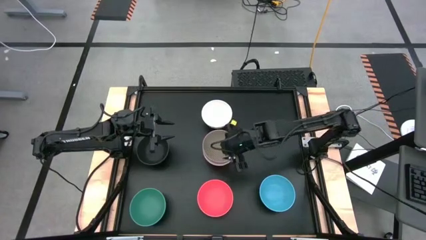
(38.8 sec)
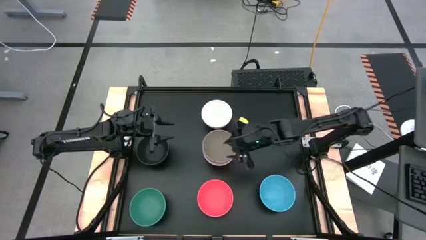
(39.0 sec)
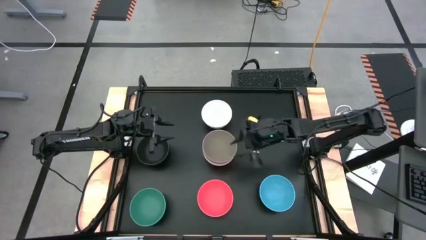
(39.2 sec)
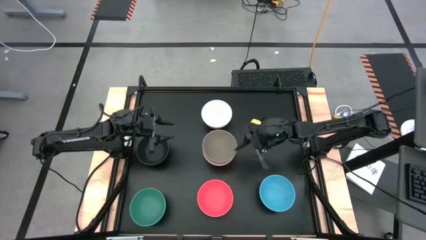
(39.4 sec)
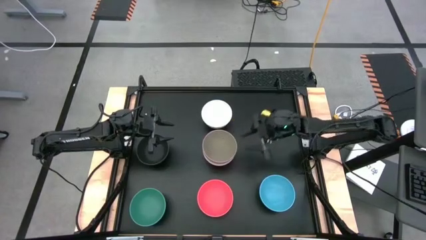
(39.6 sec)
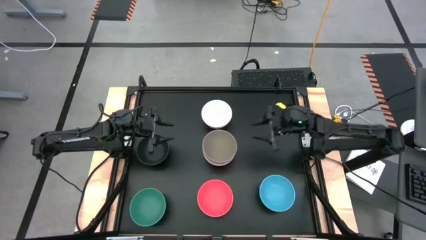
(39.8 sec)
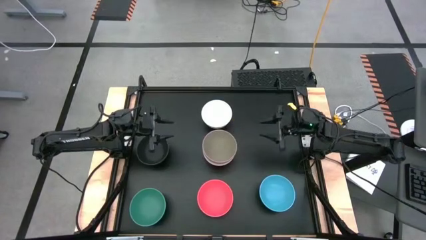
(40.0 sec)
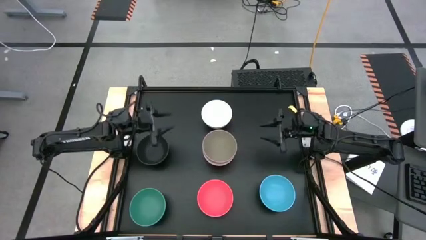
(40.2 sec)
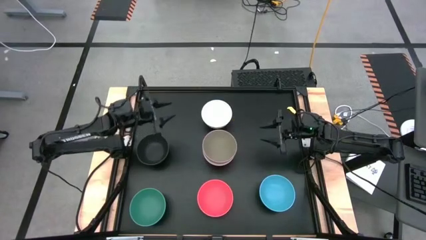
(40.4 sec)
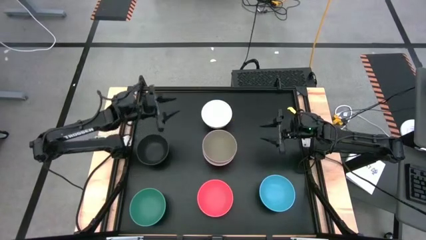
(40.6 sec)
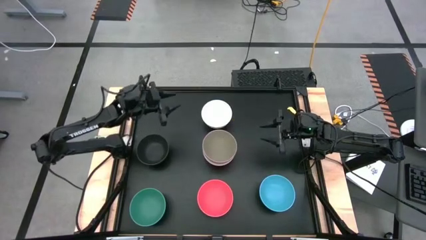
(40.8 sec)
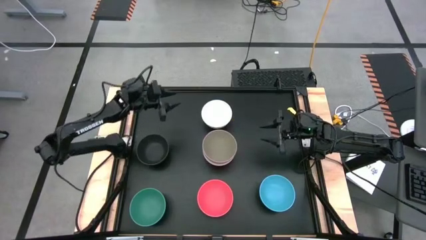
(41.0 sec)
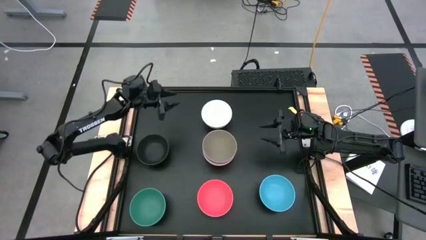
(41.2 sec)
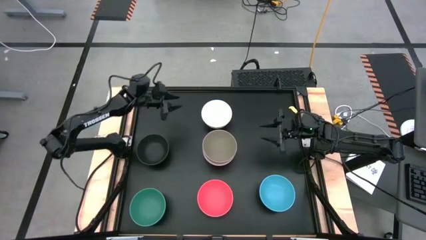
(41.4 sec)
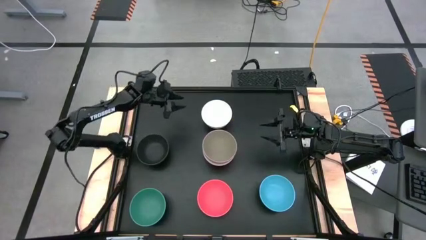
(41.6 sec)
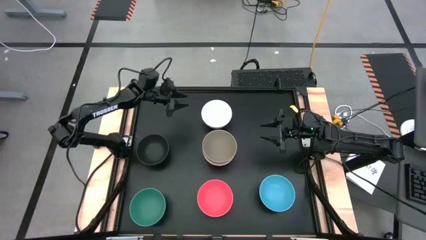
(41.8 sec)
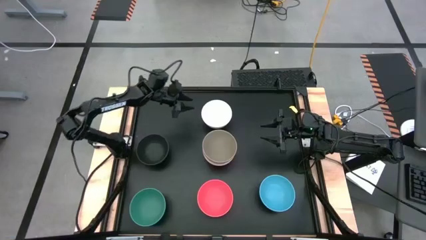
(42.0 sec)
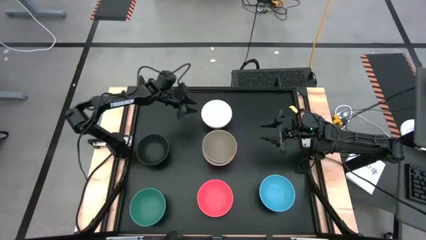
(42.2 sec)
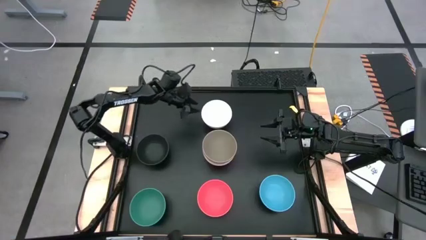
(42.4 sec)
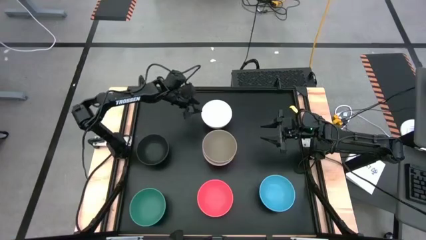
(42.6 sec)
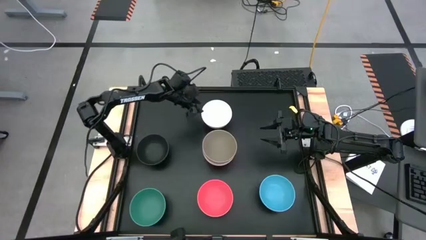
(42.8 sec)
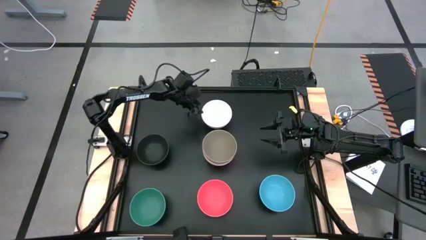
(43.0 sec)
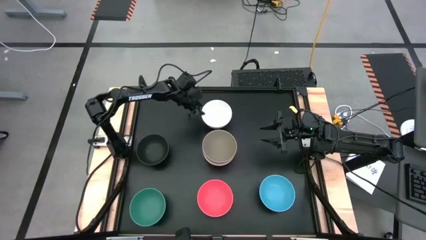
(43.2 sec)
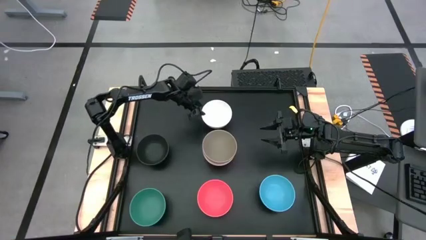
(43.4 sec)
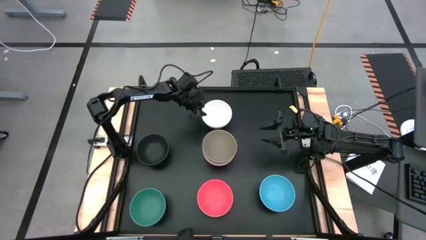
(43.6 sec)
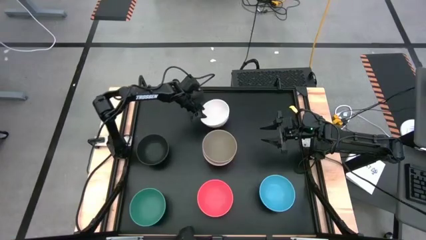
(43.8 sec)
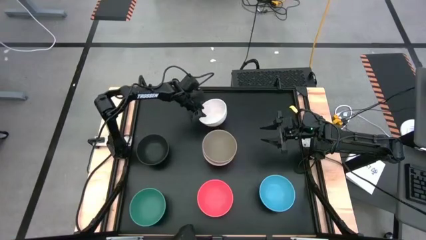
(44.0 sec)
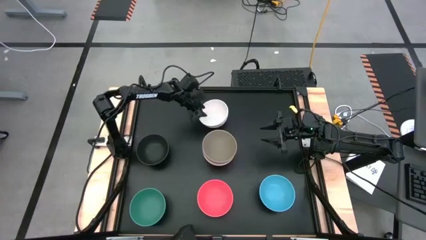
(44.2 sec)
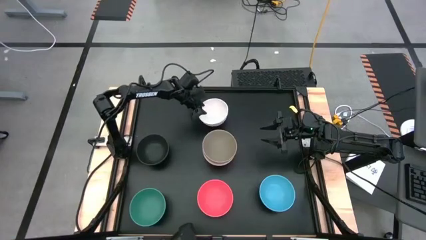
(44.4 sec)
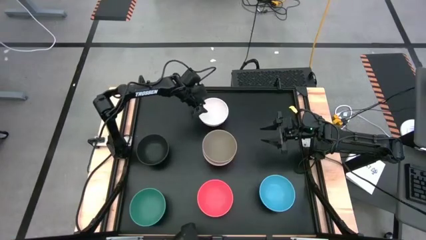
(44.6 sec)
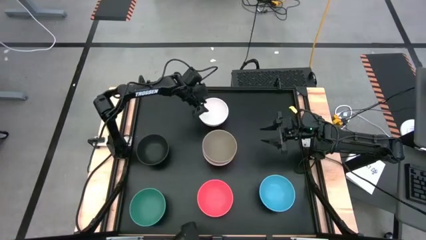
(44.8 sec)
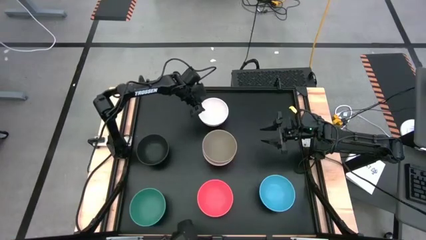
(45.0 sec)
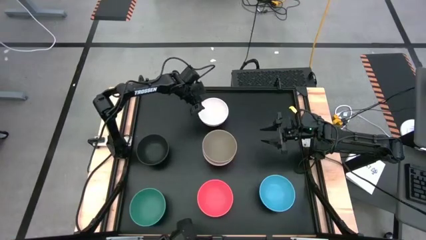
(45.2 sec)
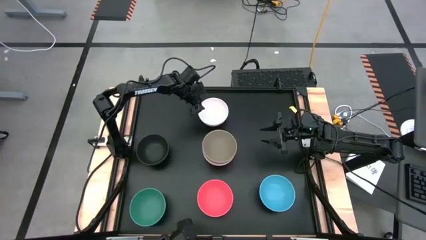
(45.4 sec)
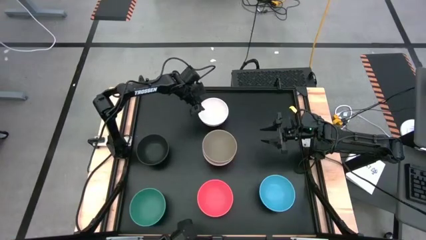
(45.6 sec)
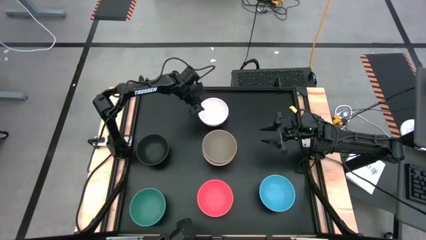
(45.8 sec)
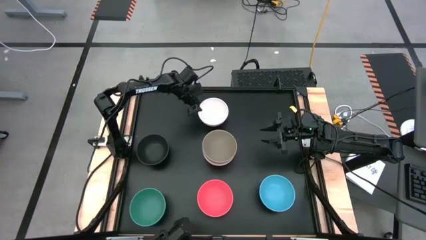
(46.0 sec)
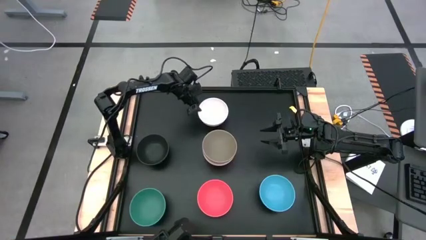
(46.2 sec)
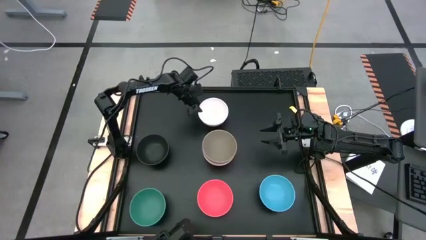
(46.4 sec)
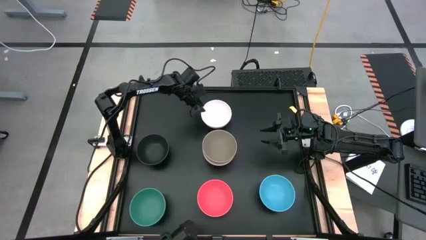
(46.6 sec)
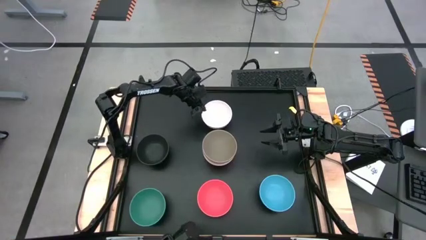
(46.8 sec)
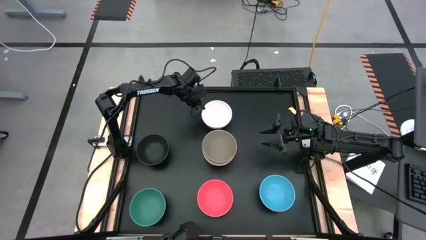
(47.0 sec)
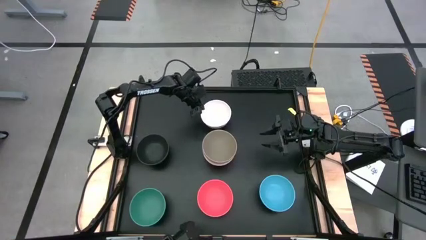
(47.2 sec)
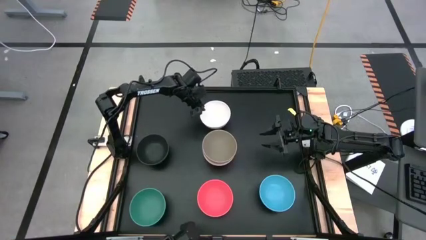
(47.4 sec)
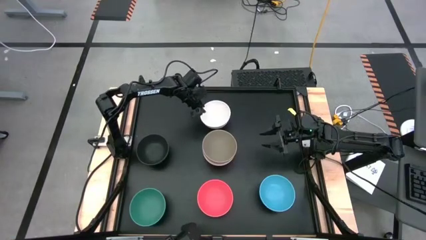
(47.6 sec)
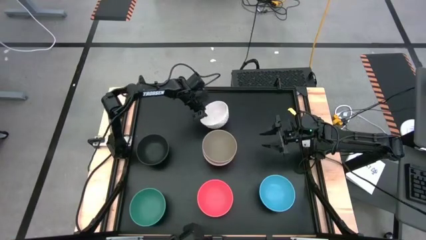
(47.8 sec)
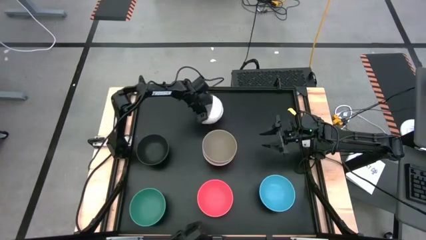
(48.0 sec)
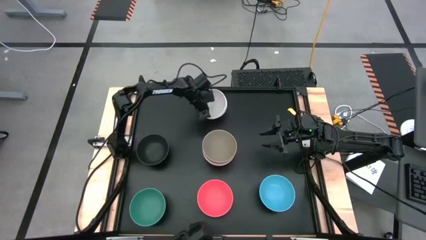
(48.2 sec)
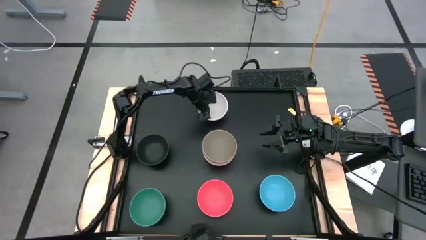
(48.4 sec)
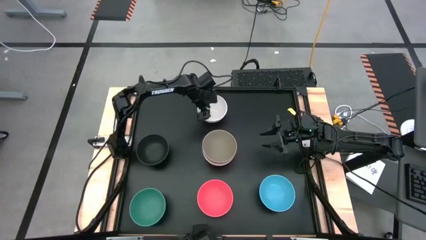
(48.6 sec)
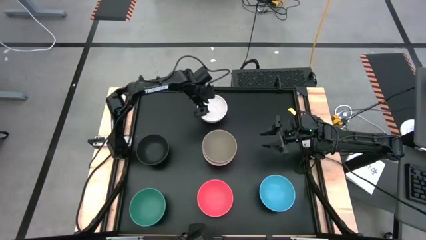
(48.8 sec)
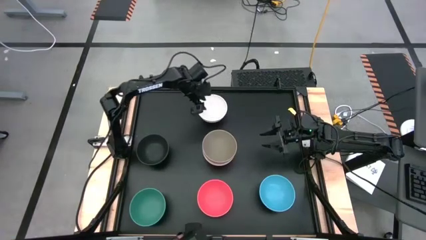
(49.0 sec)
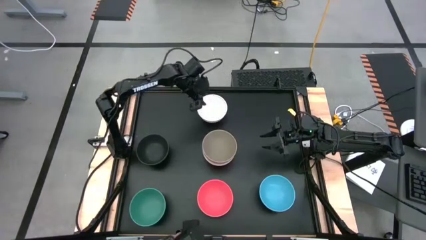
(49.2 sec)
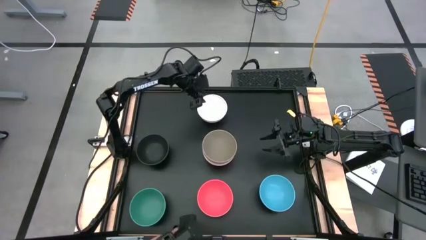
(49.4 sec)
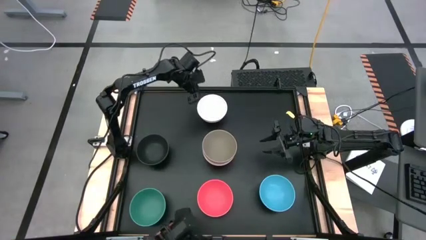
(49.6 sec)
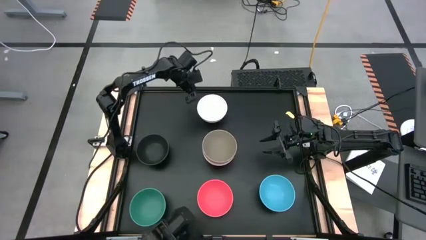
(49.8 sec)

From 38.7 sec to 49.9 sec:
Task: Nest bowls inside each other
Stack the white bowl on top of the brown bowl

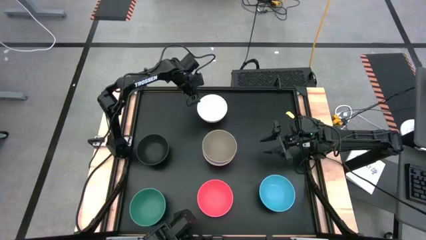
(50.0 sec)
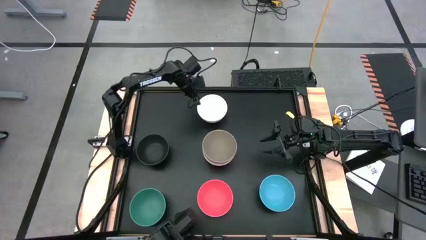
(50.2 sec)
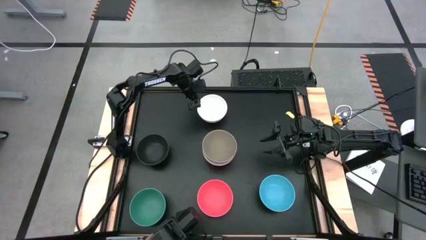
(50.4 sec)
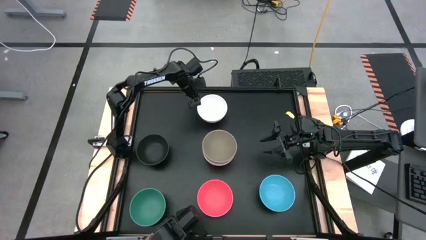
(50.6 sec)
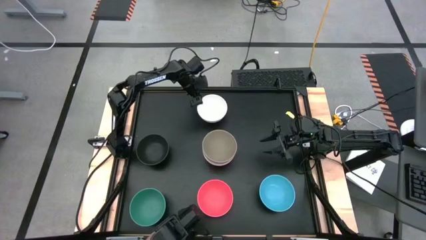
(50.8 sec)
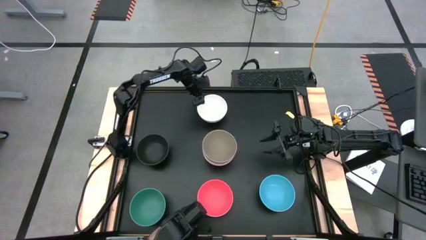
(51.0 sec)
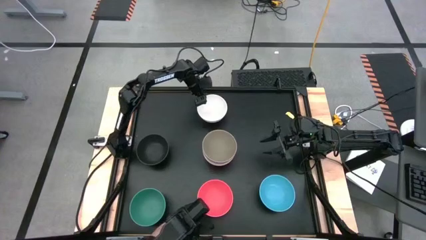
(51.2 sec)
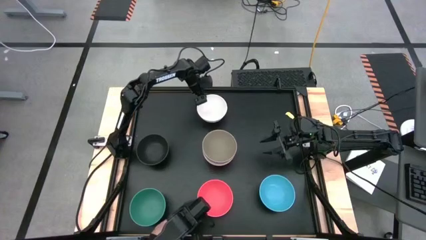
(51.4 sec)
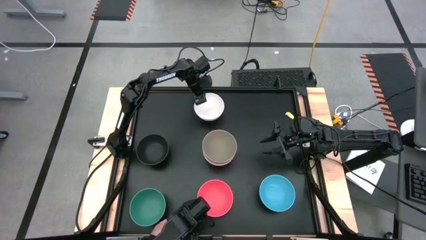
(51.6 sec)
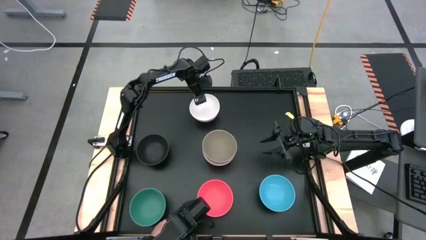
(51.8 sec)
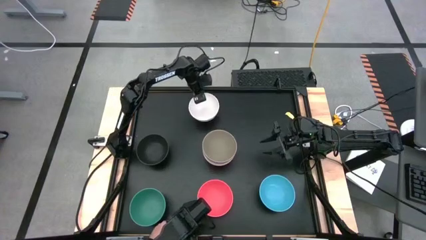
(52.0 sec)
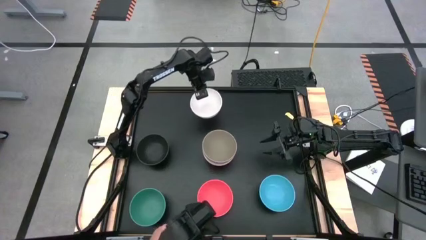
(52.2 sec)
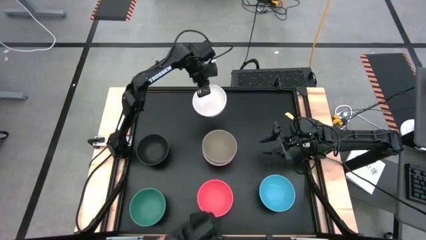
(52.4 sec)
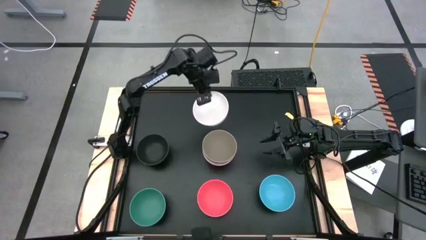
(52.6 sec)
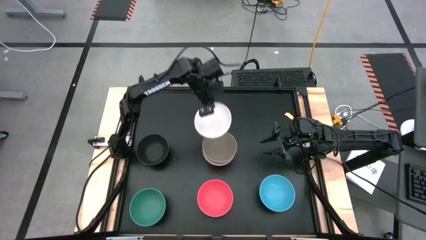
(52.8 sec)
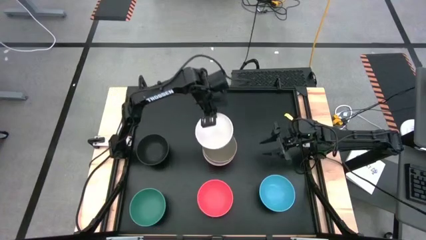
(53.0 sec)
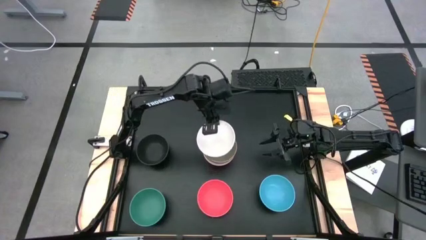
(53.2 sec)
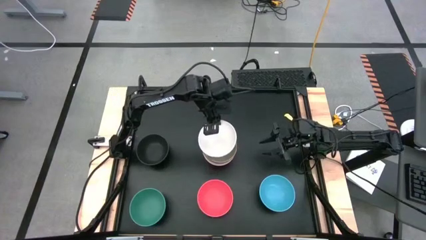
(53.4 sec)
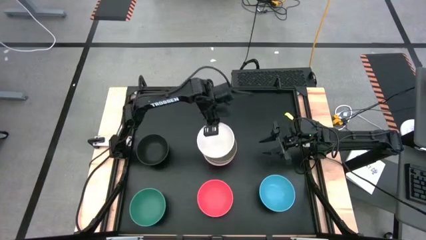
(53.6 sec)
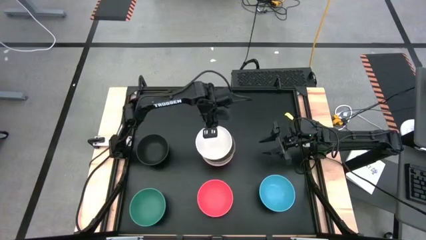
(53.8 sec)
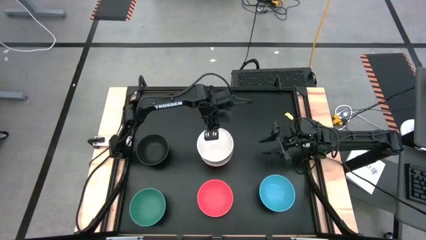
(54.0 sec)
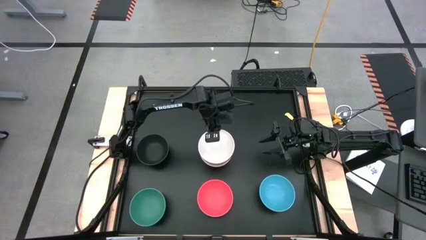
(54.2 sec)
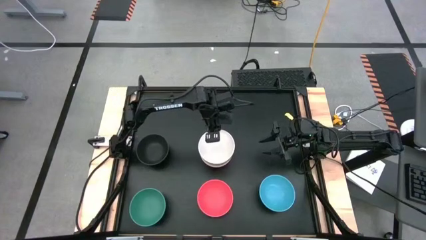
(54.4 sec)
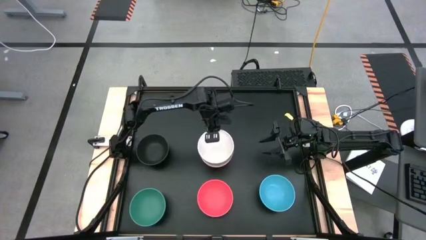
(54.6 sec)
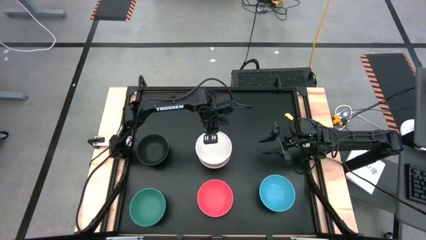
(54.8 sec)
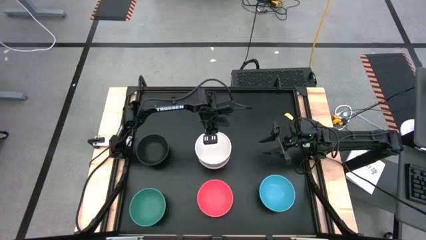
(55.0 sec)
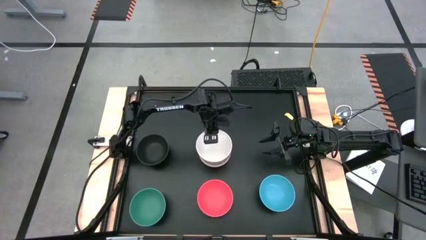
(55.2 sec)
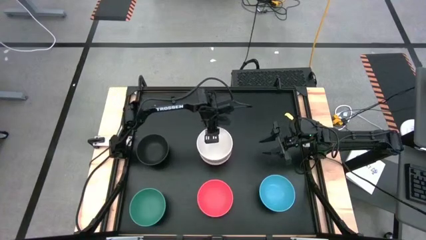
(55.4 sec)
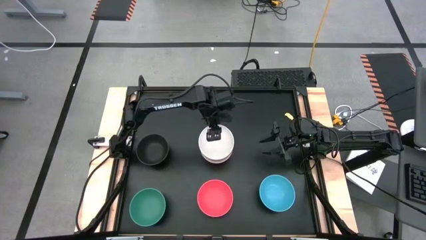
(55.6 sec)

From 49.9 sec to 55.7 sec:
Stack the white bowl on top of the brown bowl
